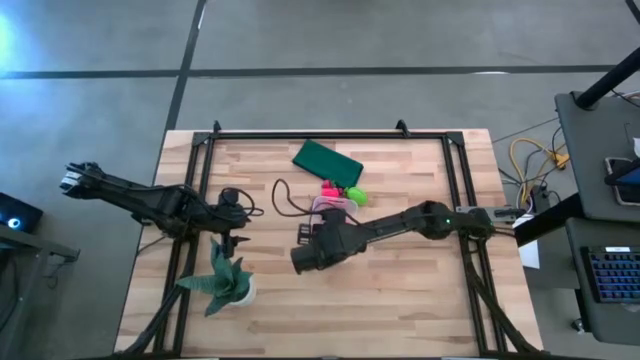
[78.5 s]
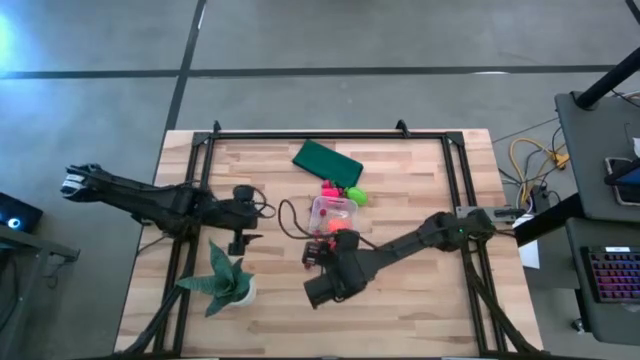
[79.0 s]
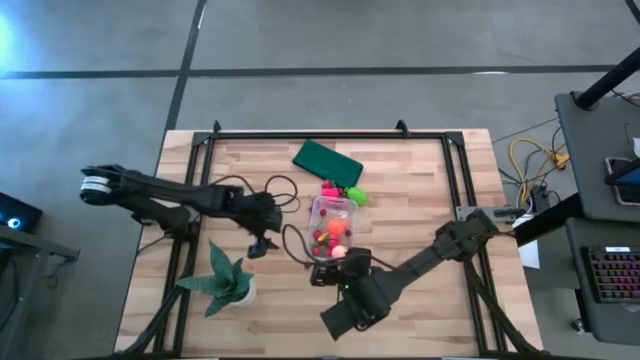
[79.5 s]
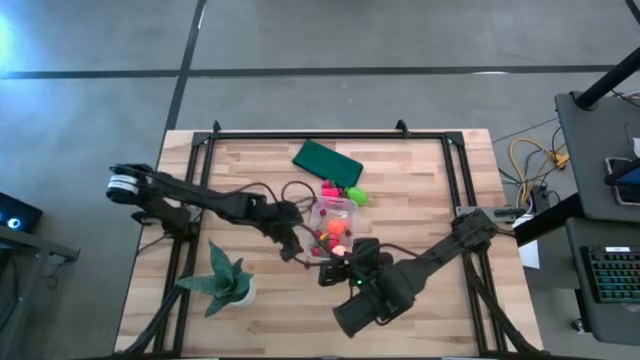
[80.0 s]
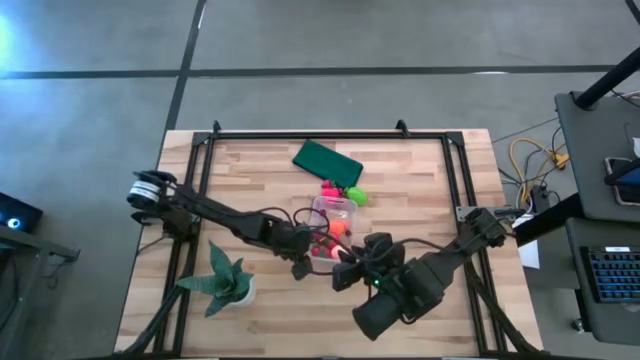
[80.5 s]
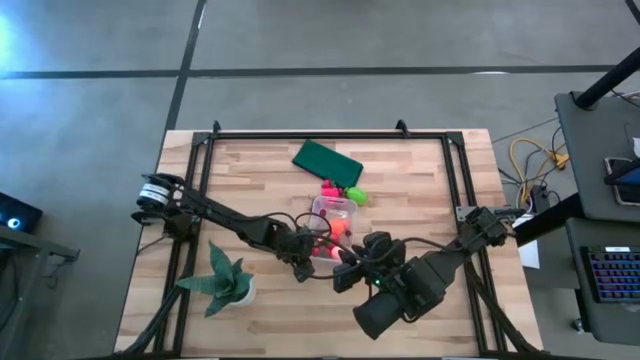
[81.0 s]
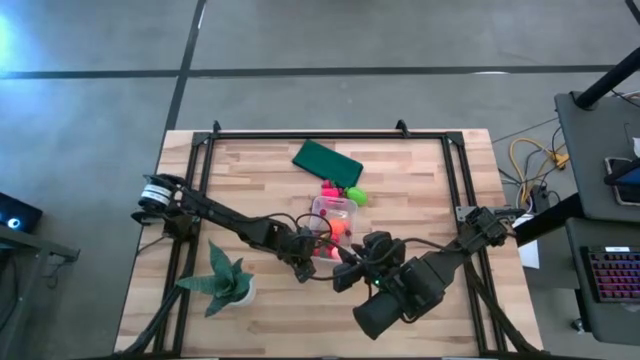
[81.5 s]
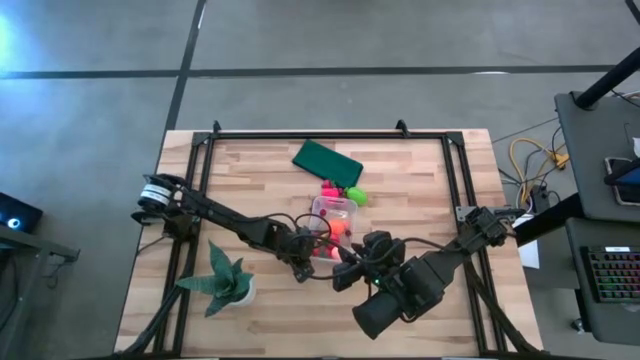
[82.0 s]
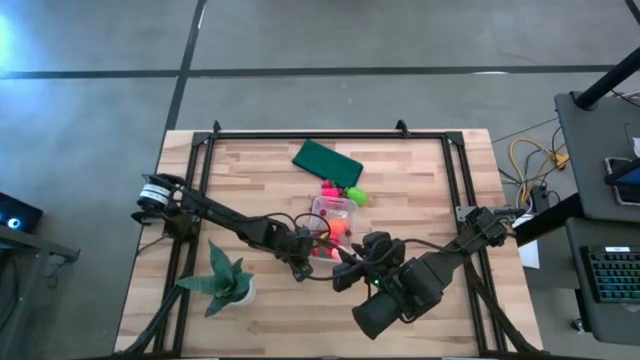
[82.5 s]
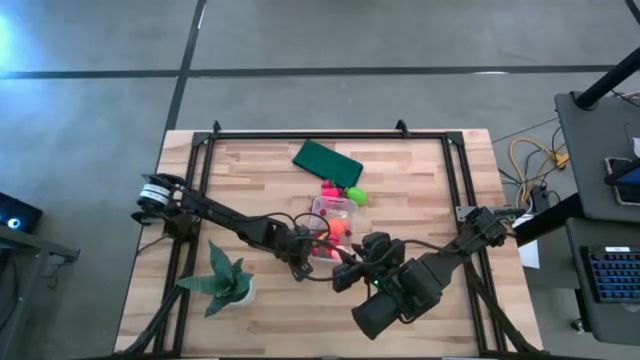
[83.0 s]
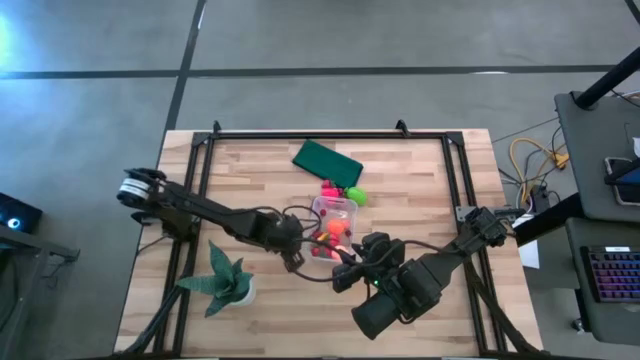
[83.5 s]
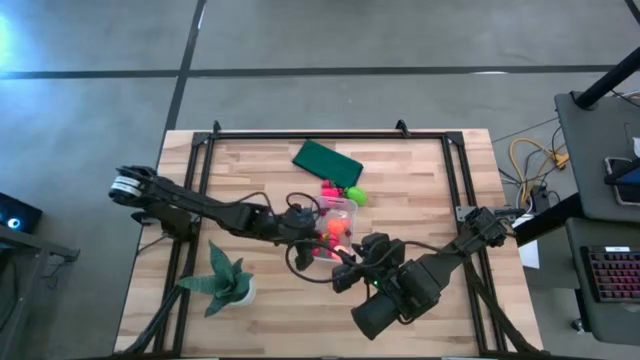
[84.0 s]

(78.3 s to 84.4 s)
Task: Pick and placing Produce into tupperware
Put the red cherry into the transparent bin

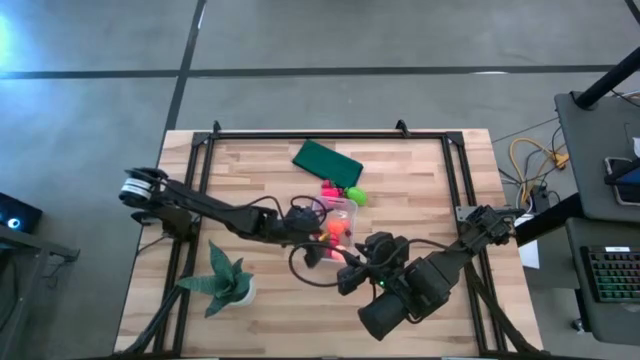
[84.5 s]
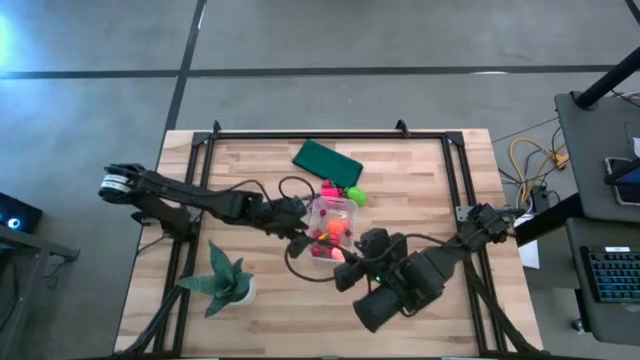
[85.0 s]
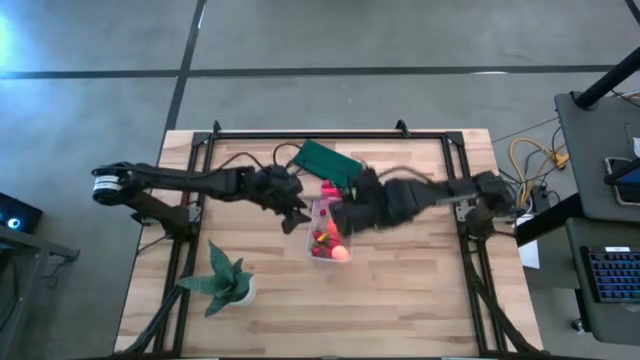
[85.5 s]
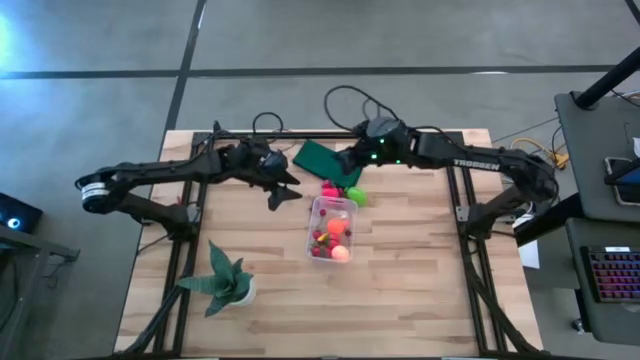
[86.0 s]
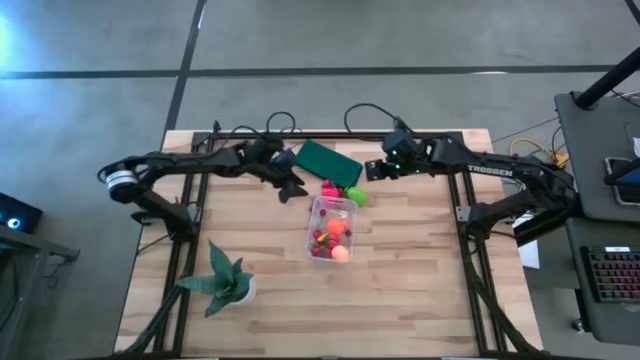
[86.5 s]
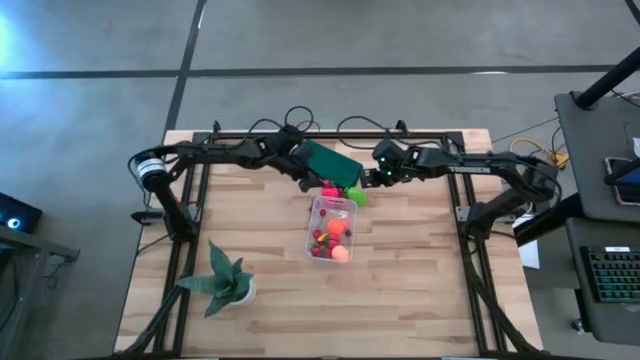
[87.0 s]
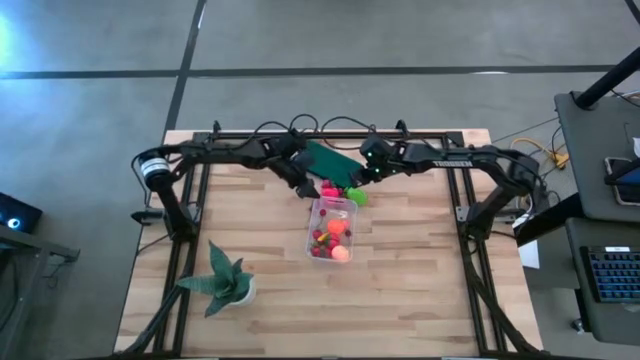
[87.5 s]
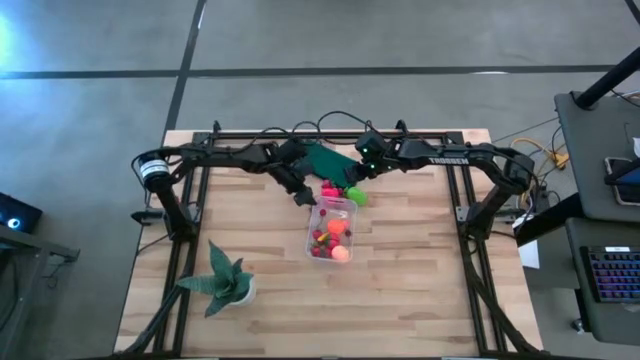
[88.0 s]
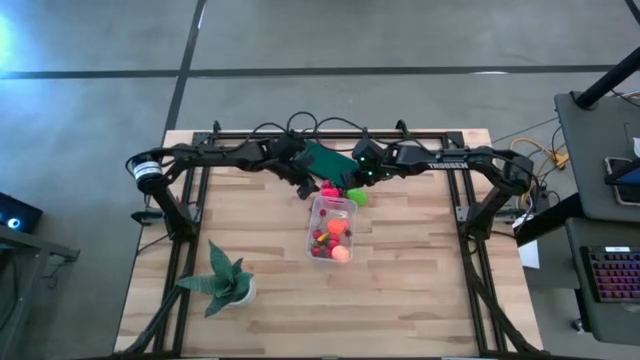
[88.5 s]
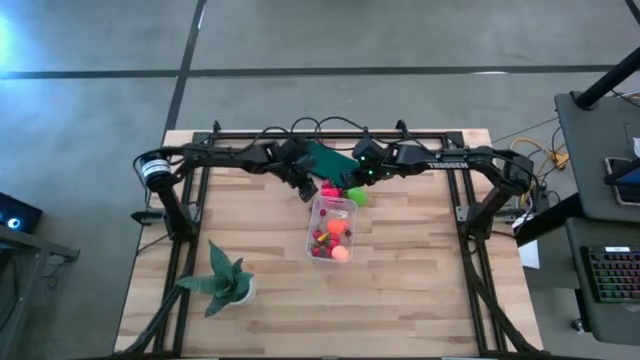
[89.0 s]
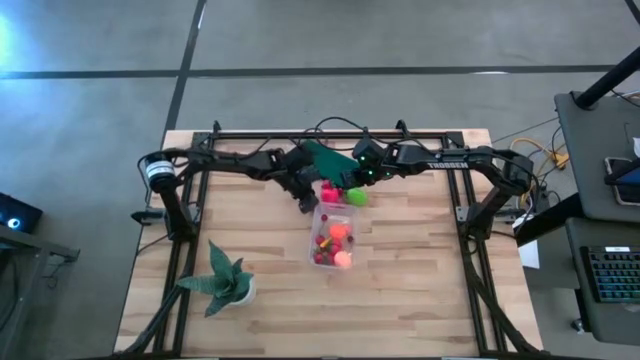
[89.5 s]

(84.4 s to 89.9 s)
Adjust the transparent bin

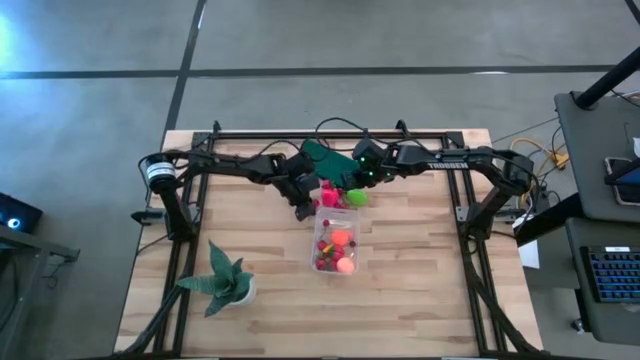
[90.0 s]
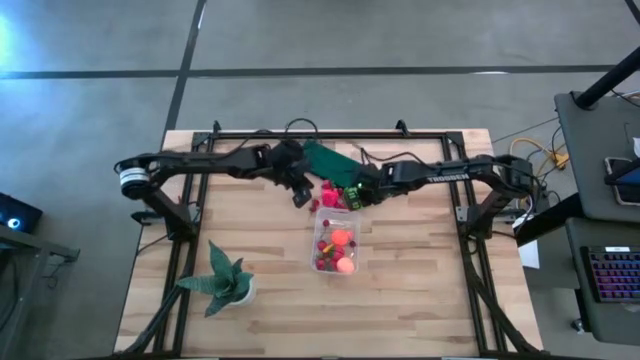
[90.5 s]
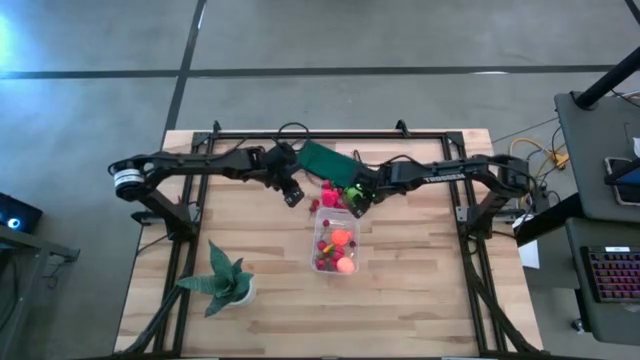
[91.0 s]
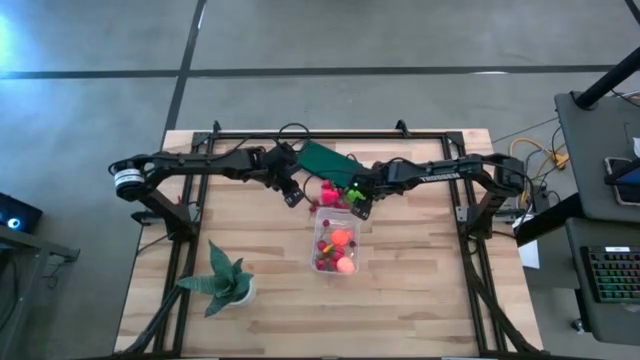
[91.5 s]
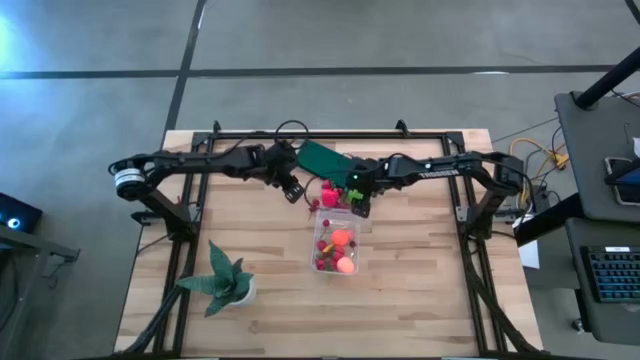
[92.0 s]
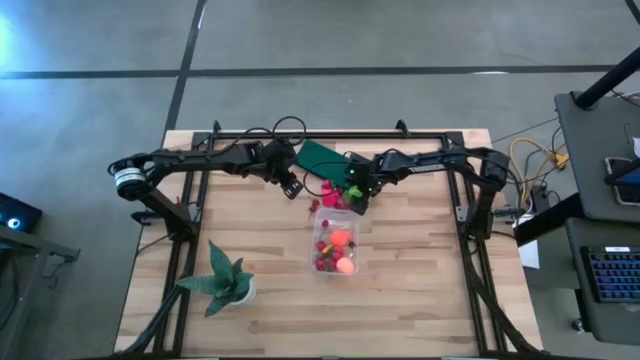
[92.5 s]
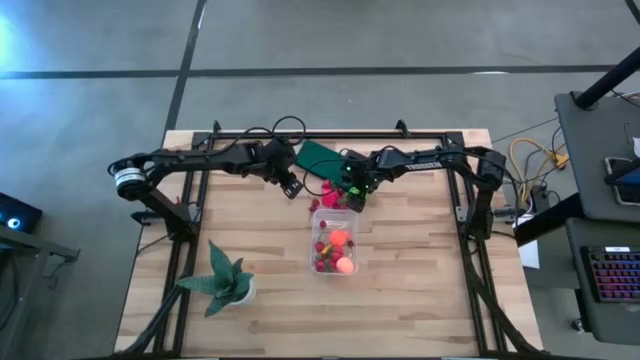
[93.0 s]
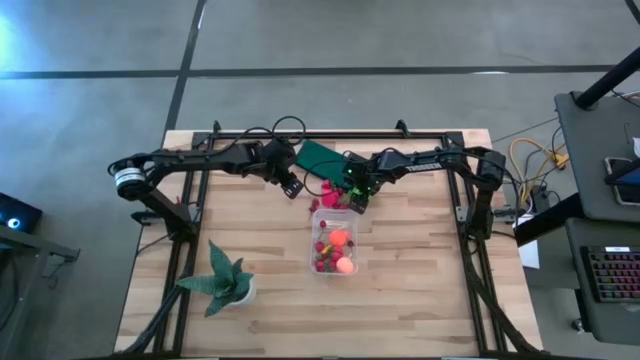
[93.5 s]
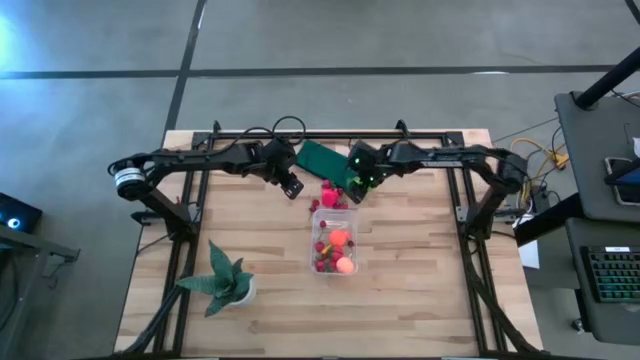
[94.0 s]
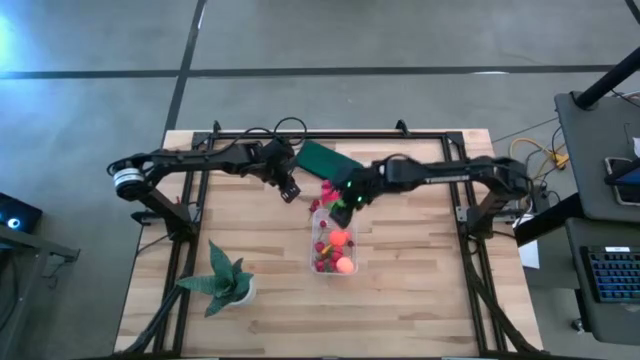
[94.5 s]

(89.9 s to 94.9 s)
Put the green melon into the transparent bin

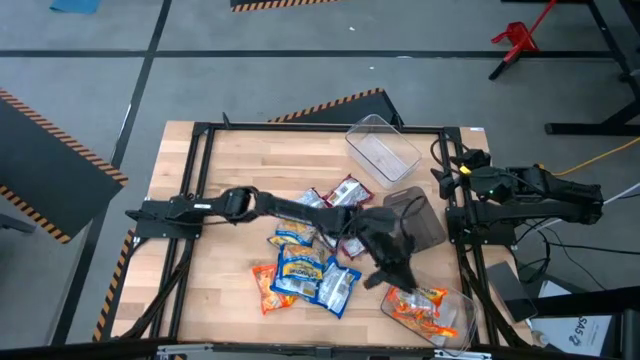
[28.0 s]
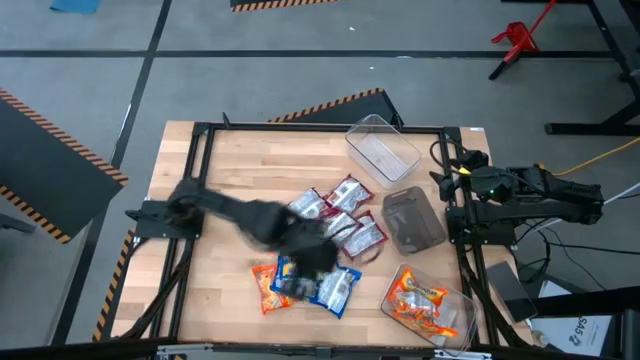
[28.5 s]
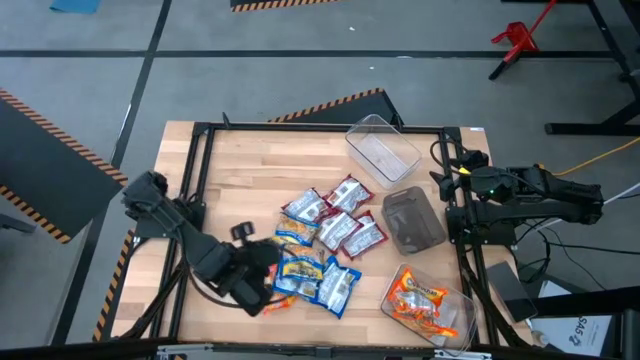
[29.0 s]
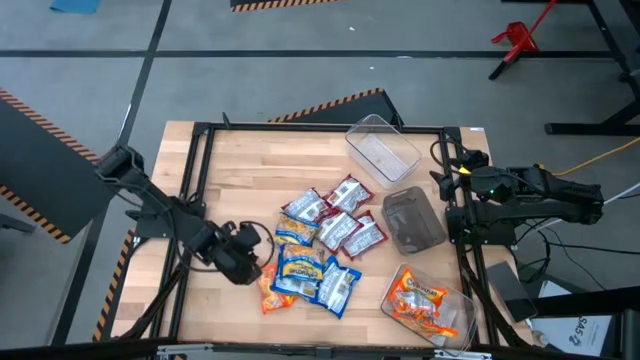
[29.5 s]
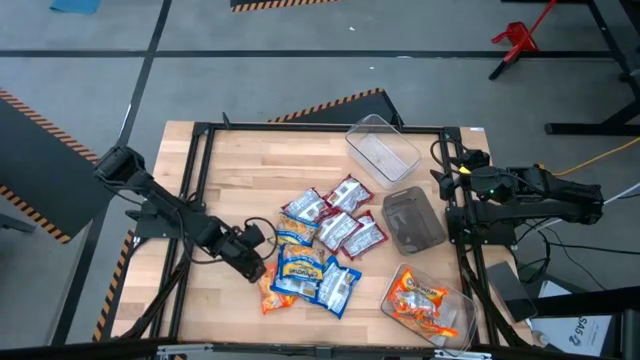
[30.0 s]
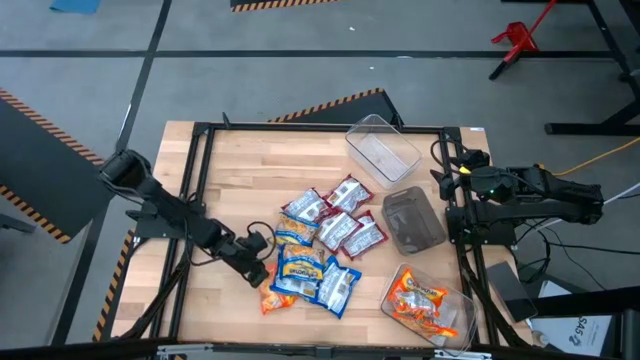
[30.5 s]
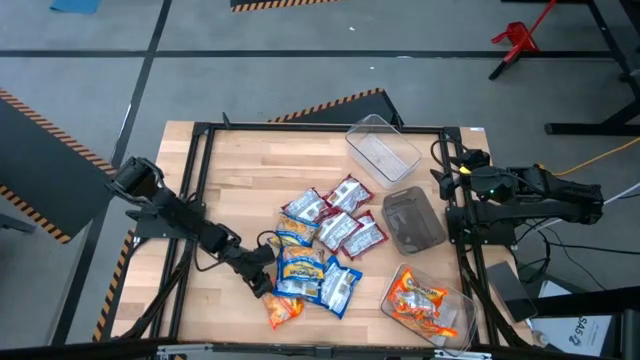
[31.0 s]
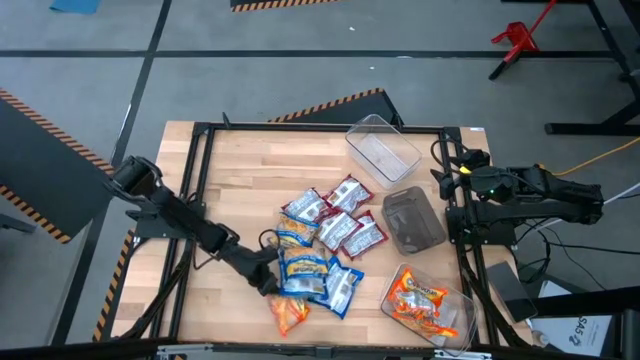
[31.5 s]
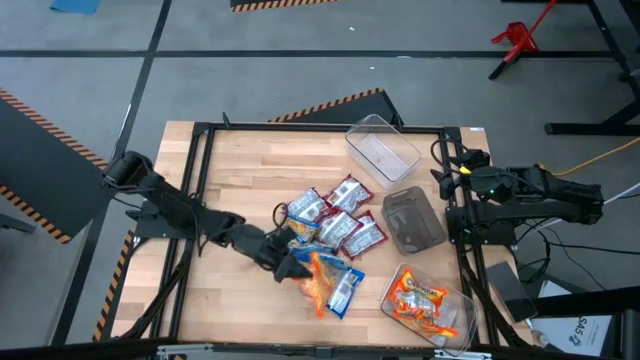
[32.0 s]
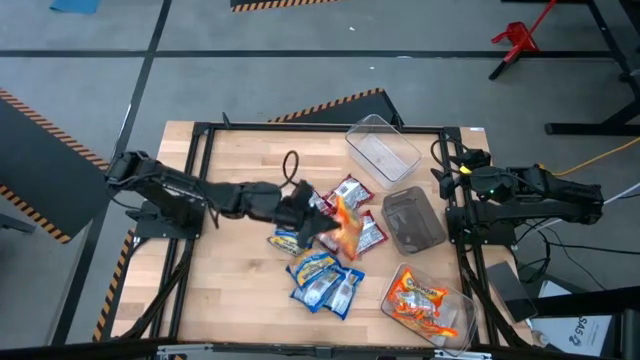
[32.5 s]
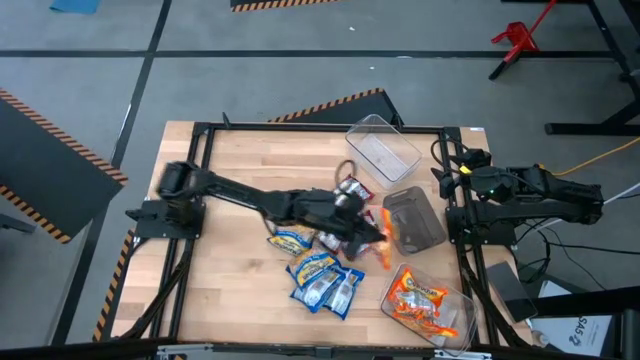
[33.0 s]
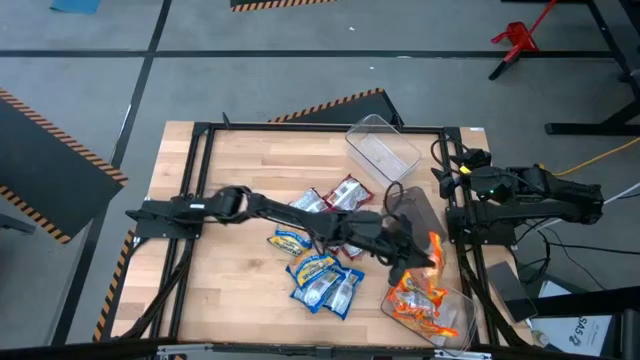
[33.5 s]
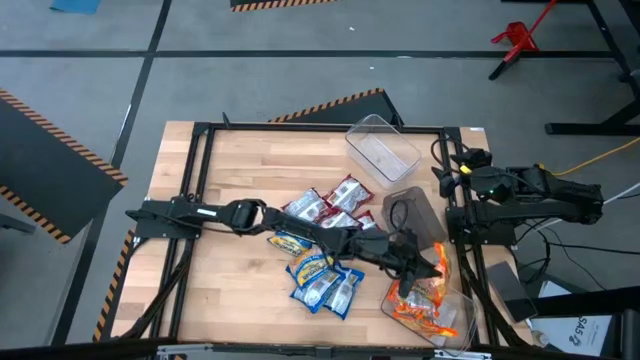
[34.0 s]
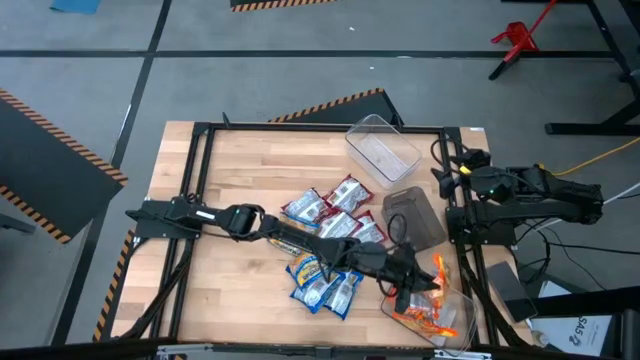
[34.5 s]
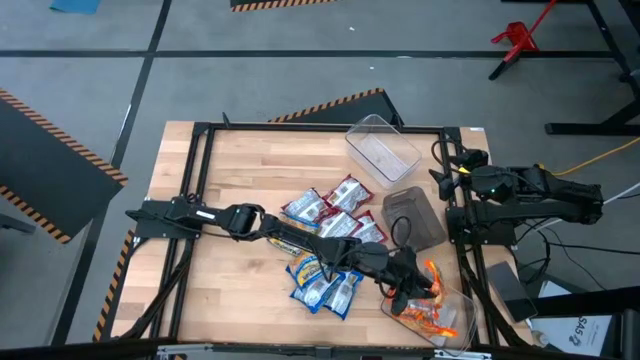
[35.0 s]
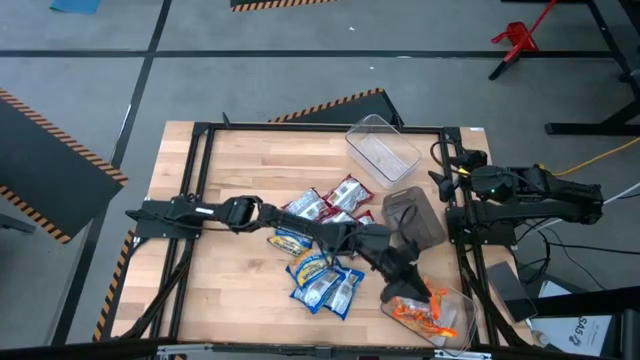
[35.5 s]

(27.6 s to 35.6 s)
Task: Sort Maruchan noodles
Put the orange bag into the bottom transparent bin
